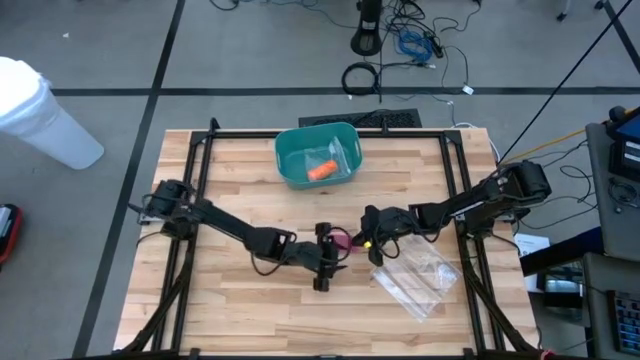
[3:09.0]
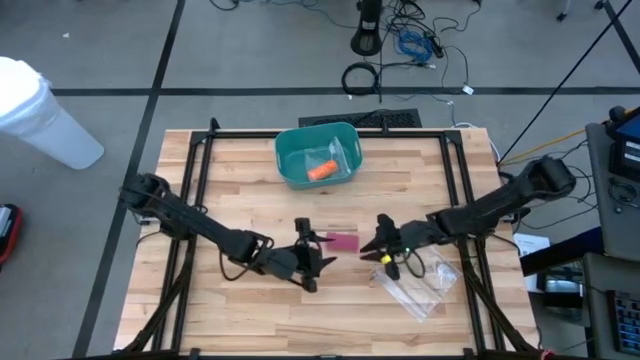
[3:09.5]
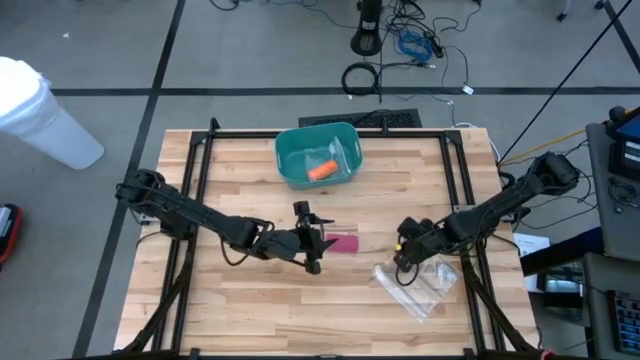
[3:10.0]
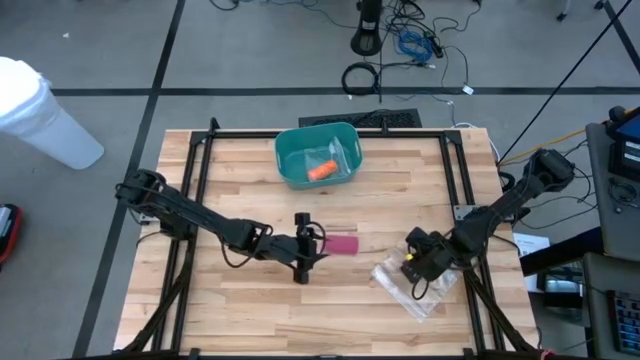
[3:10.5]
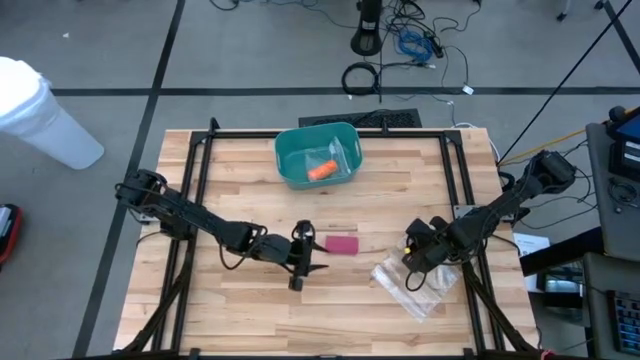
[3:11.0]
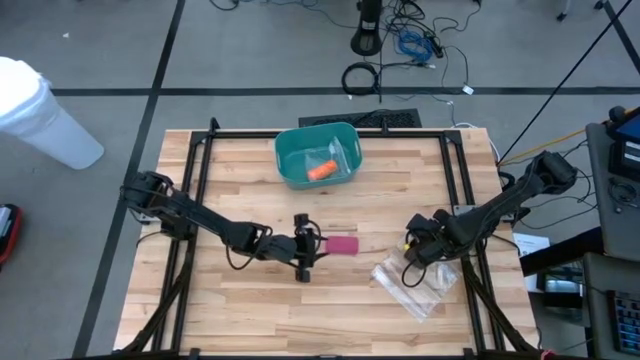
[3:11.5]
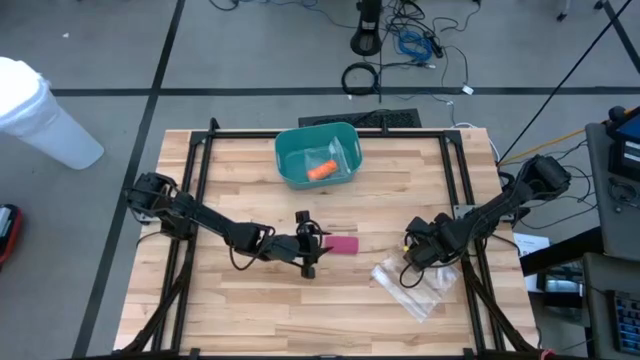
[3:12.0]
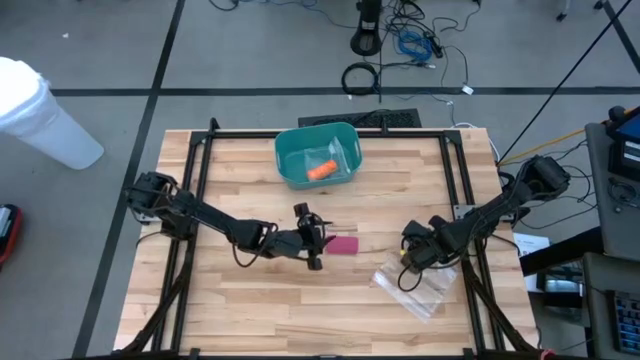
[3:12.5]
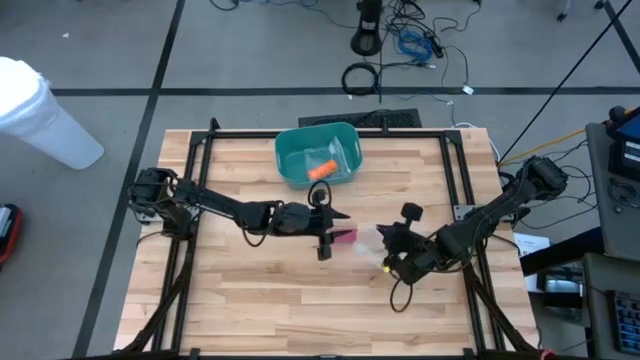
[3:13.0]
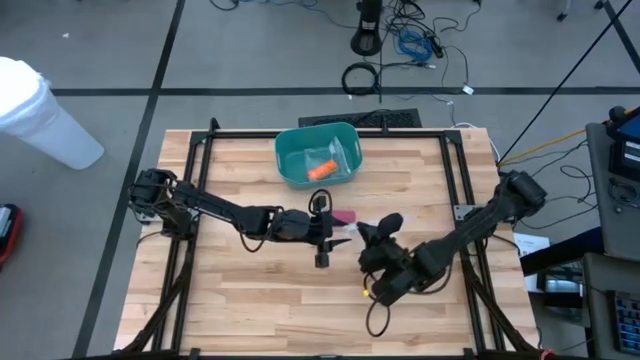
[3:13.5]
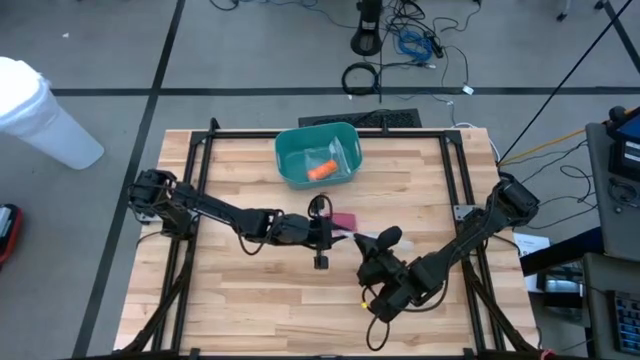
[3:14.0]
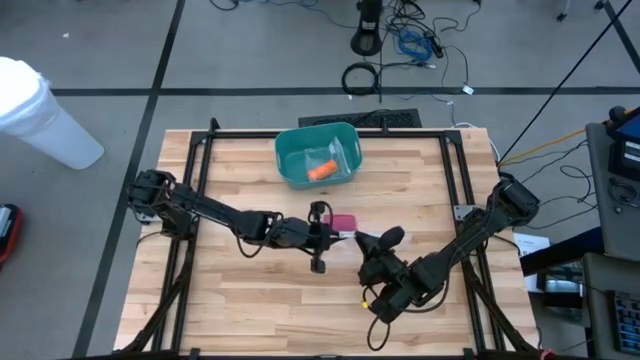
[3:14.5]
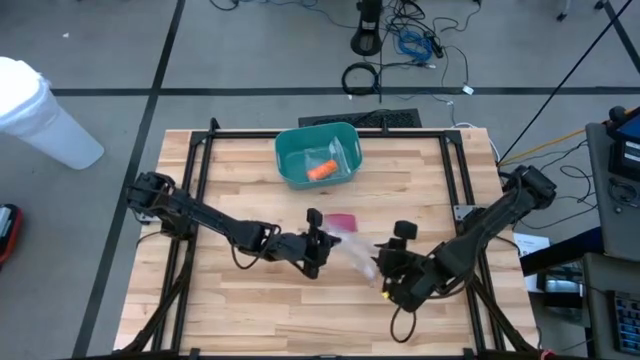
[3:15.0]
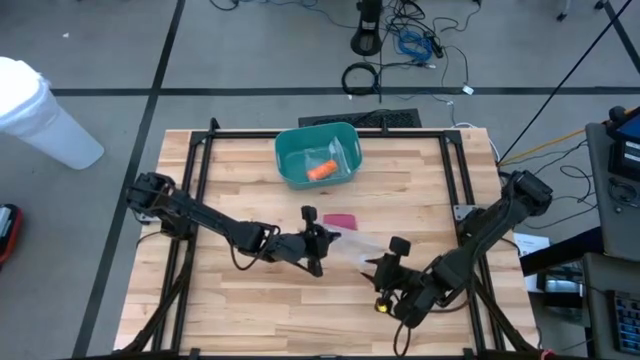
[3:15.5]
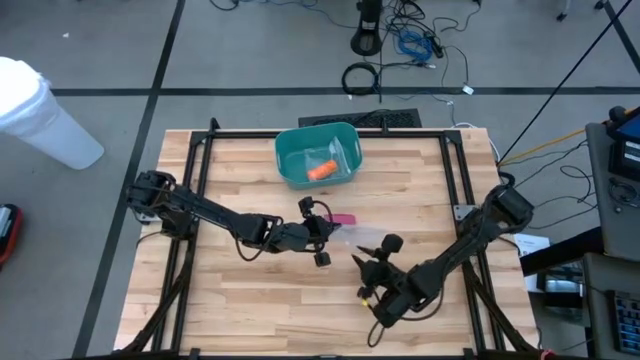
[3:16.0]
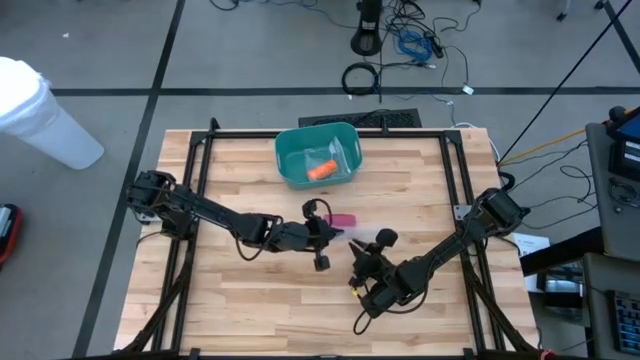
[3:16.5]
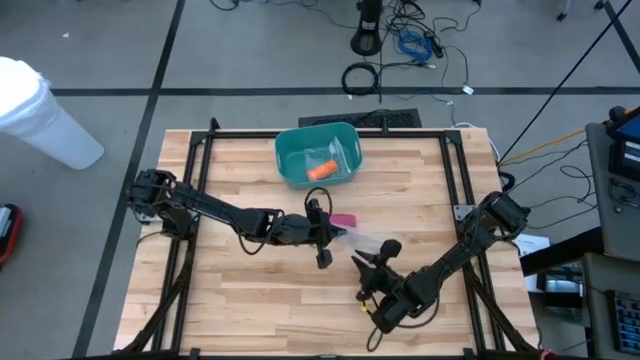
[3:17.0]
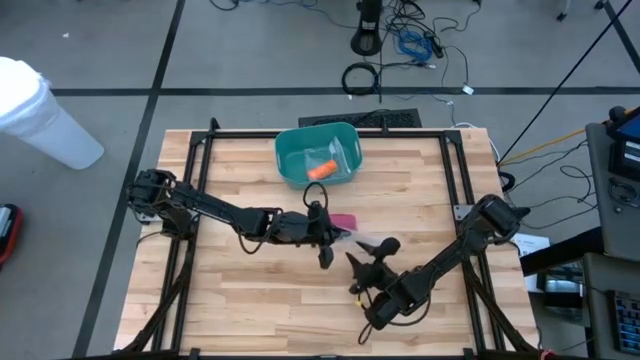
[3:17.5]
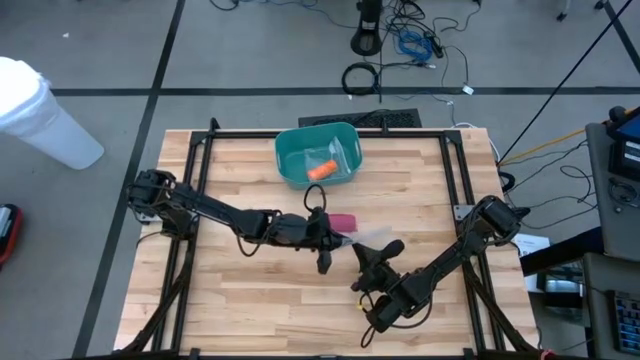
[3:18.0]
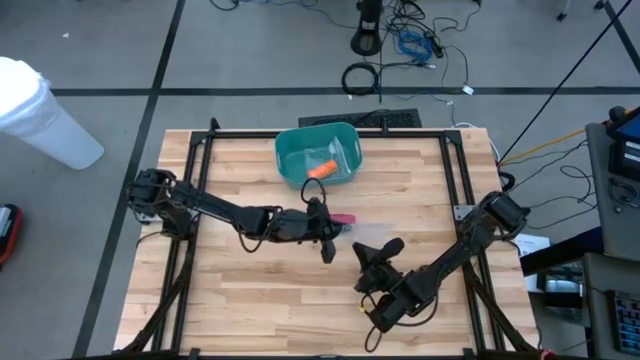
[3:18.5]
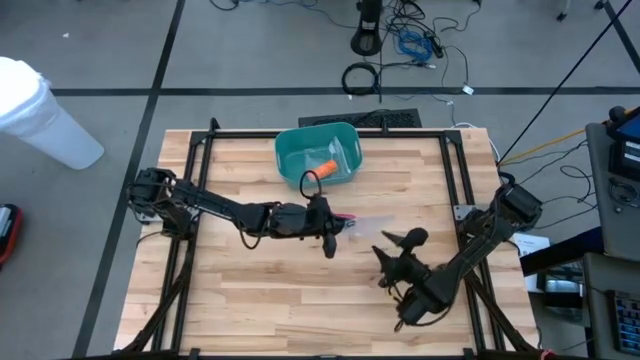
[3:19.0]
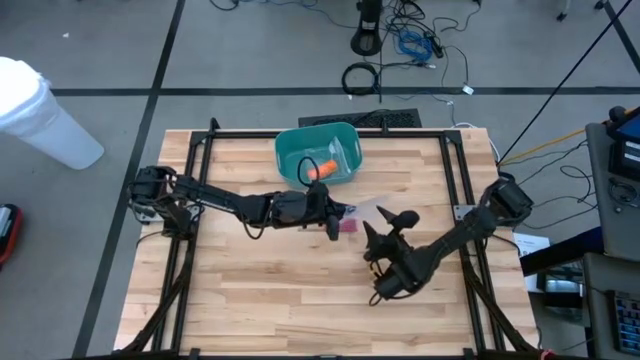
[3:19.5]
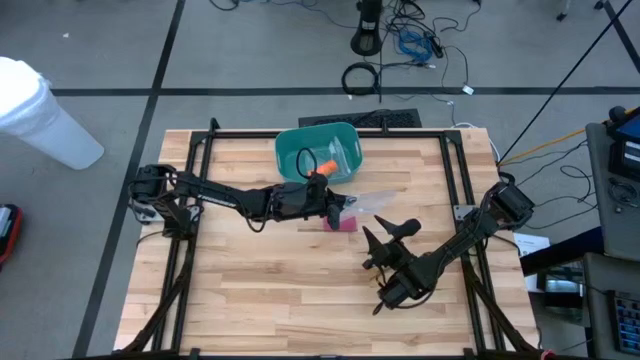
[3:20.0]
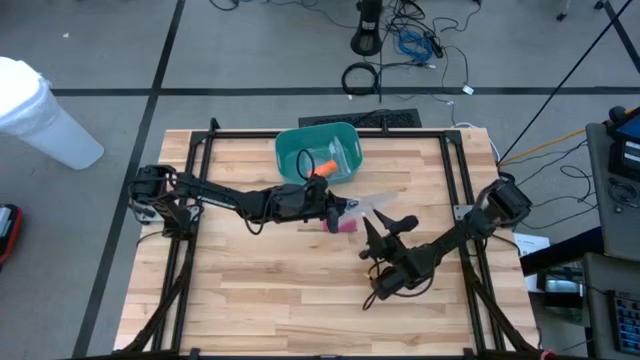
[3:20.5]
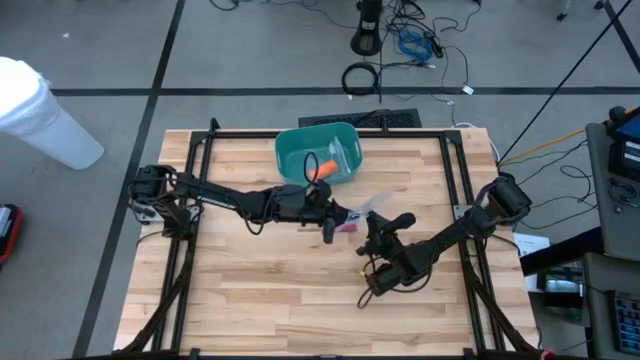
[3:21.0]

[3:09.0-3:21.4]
Task: Roll bandage
Open the transparent zip bag
